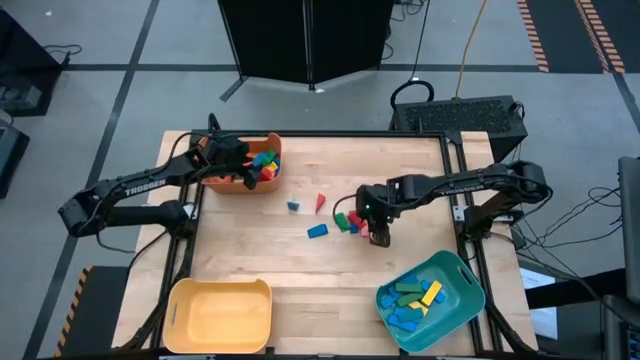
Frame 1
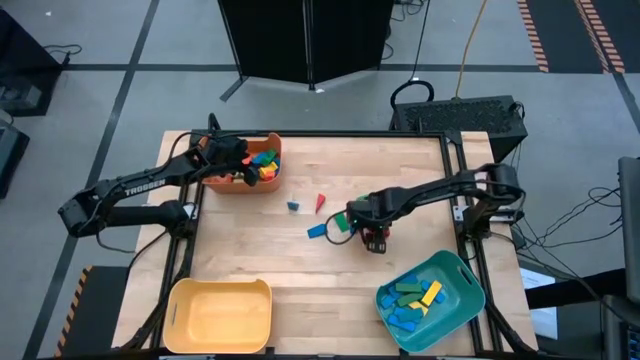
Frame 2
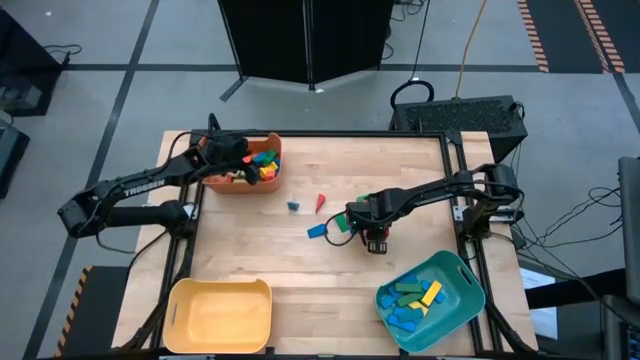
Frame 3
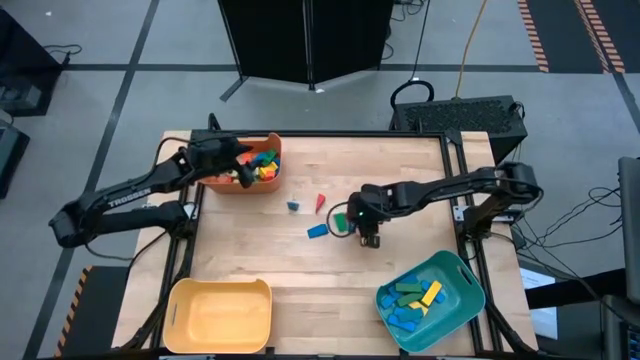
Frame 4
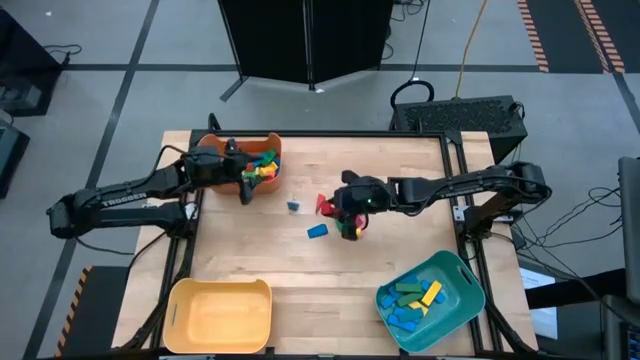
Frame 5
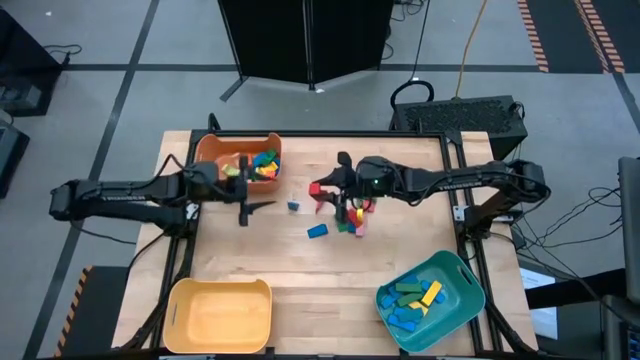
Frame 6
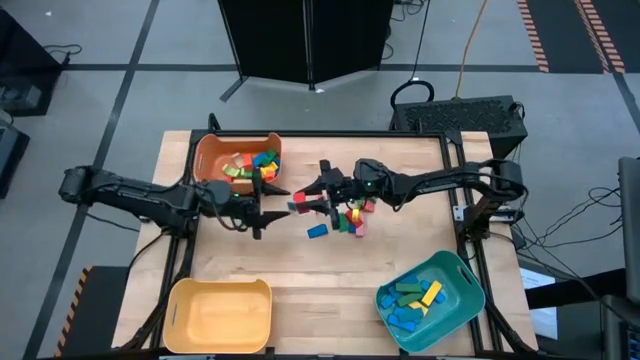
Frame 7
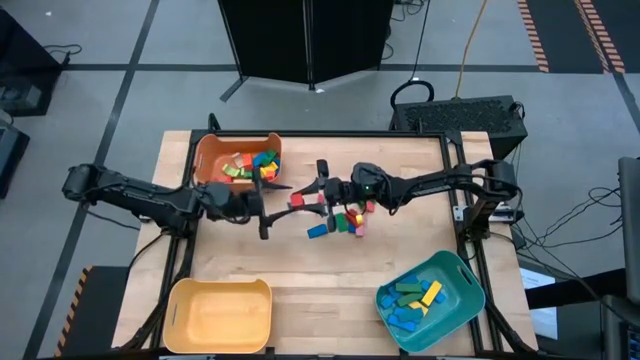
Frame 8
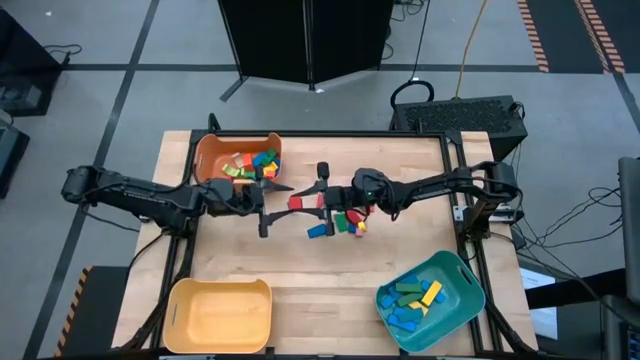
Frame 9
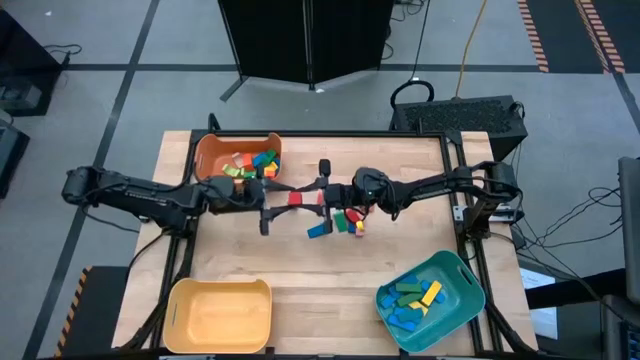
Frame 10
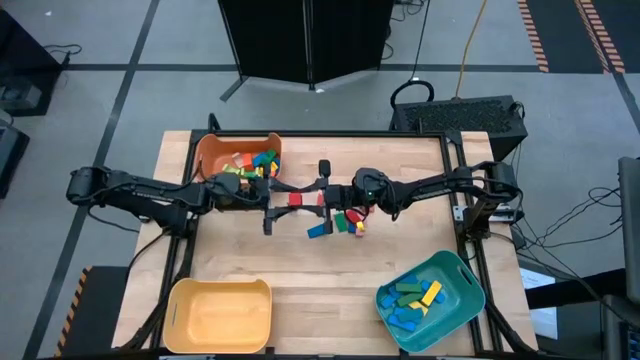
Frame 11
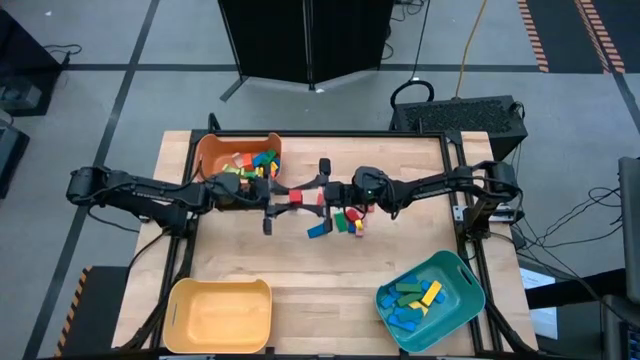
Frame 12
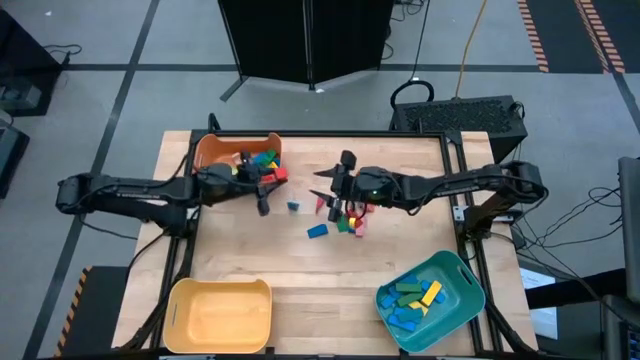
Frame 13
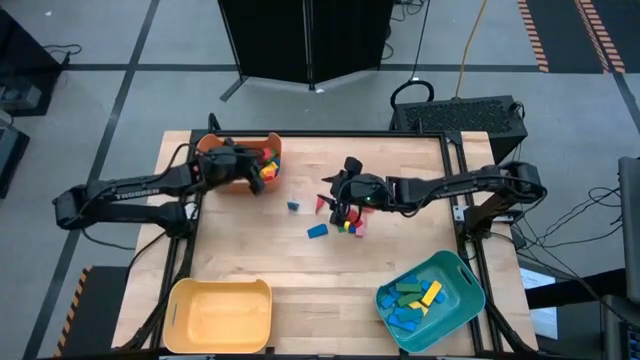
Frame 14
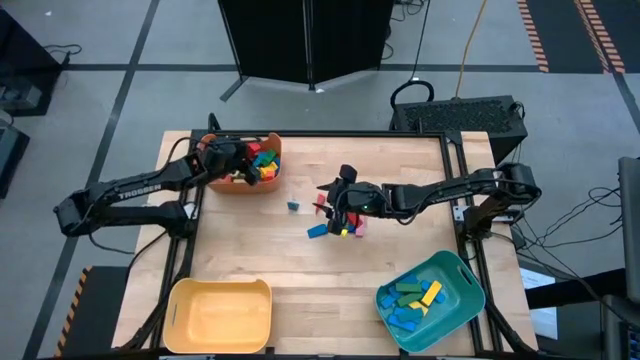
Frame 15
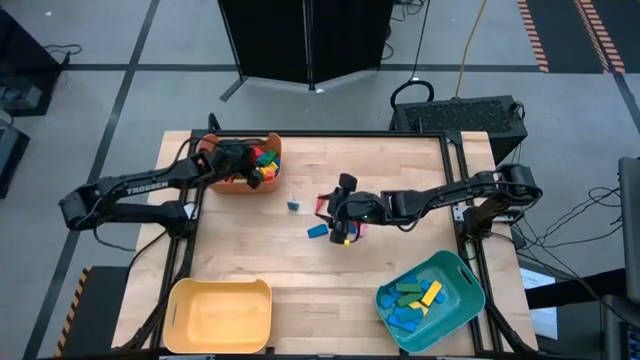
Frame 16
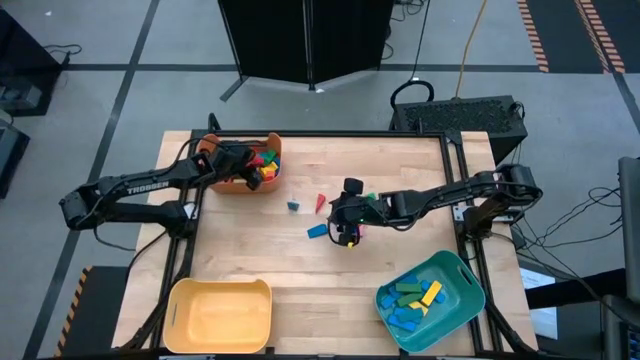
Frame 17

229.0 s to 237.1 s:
Task: Sort blocks by size
Put the red arch block into the orange bin

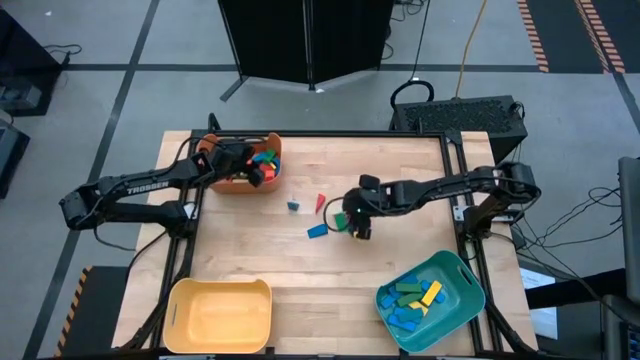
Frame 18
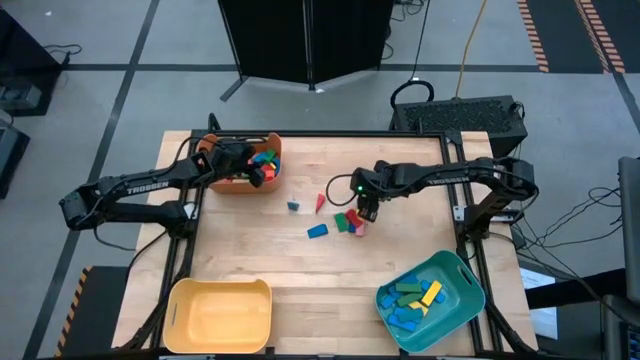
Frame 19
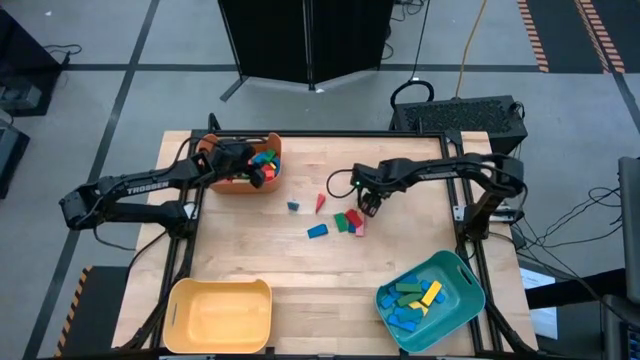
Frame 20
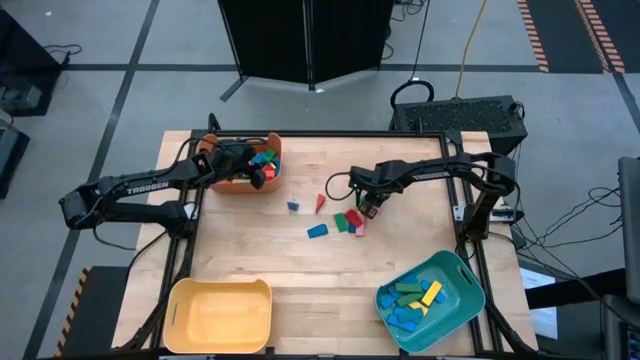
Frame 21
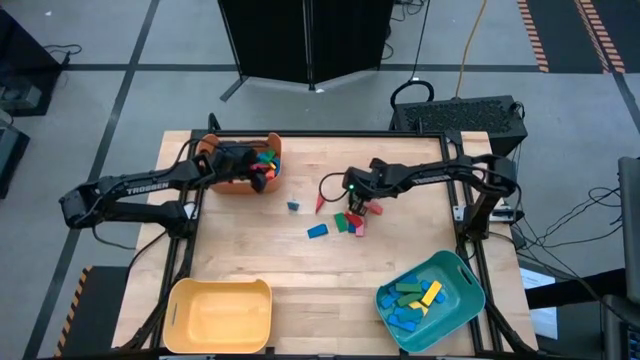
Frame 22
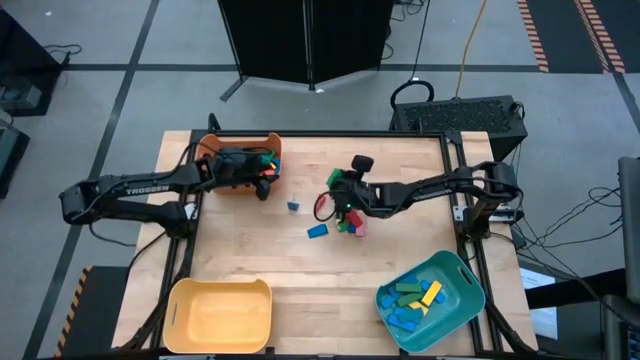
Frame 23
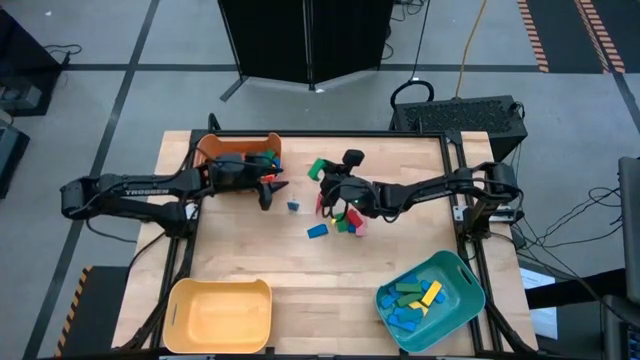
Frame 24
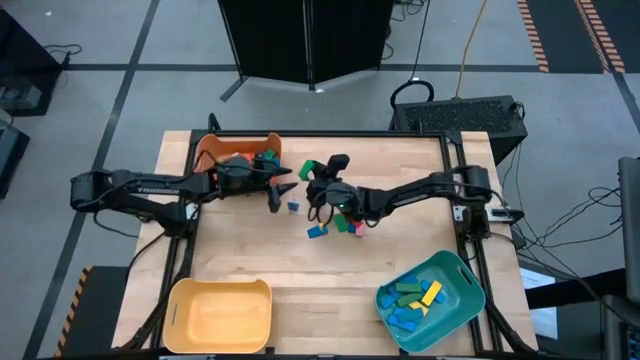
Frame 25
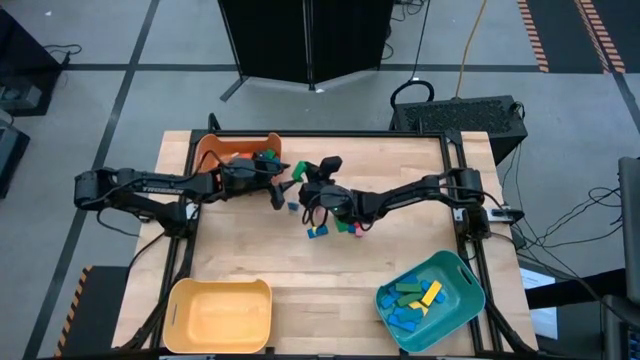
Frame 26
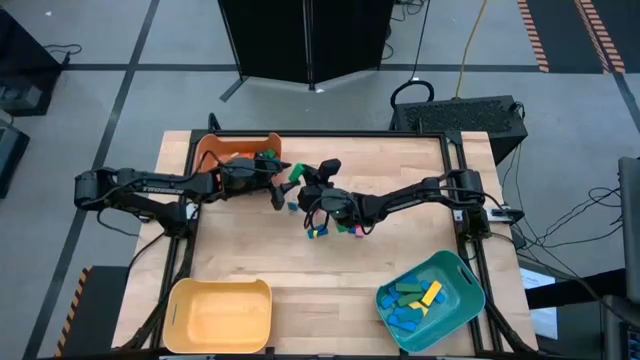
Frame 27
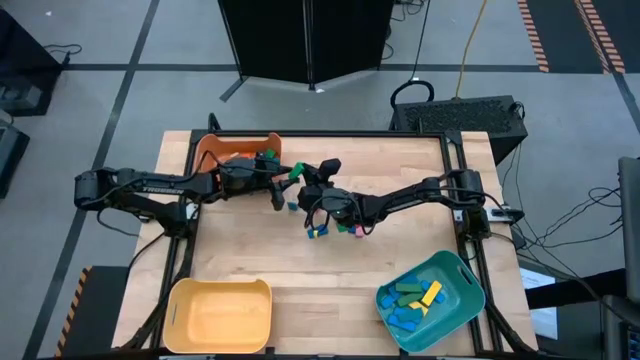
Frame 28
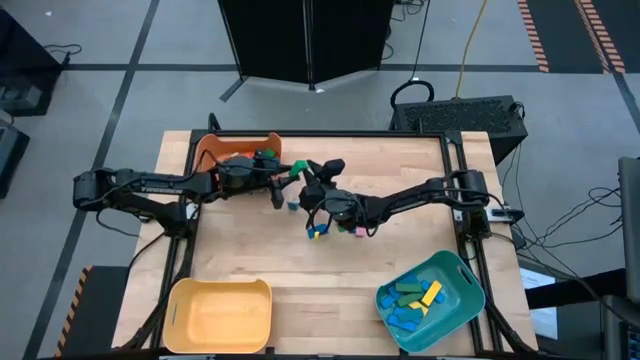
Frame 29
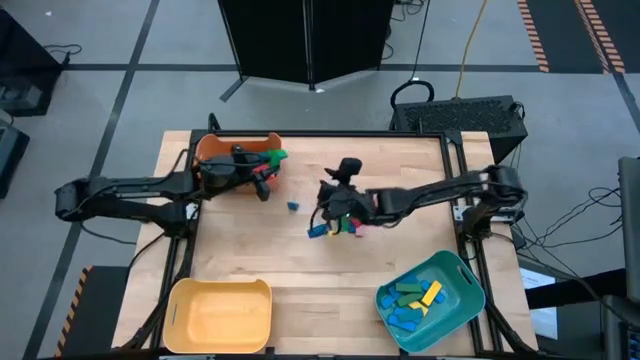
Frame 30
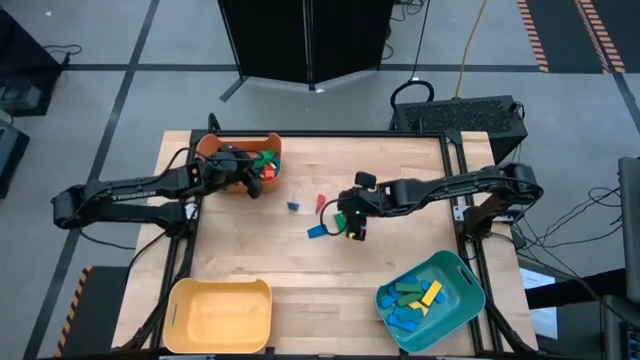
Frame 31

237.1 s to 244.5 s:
Put the green arch block into the orange bin

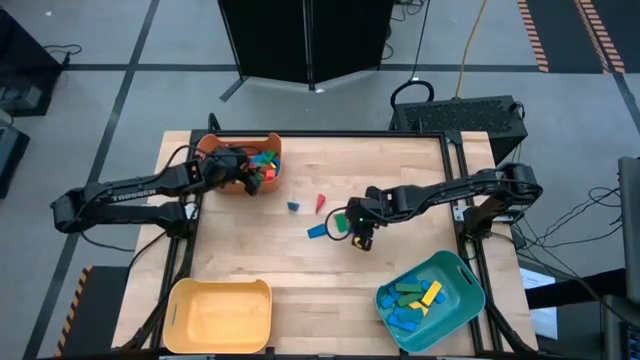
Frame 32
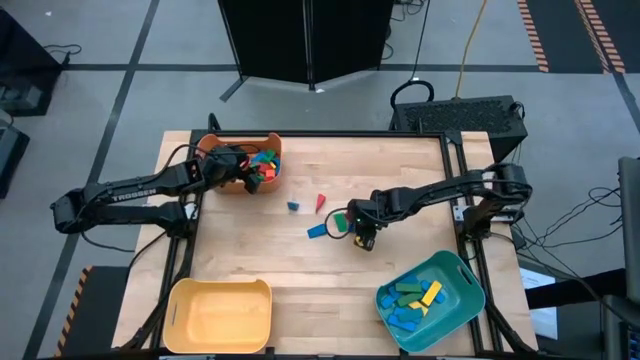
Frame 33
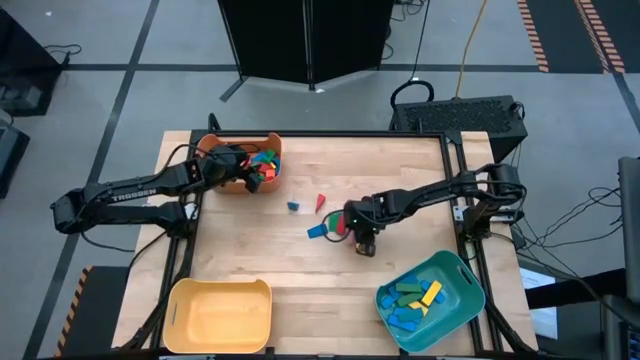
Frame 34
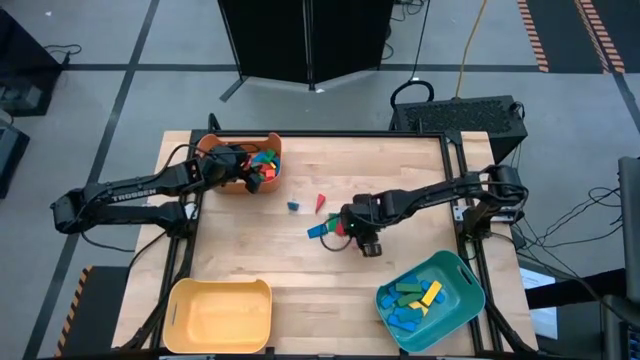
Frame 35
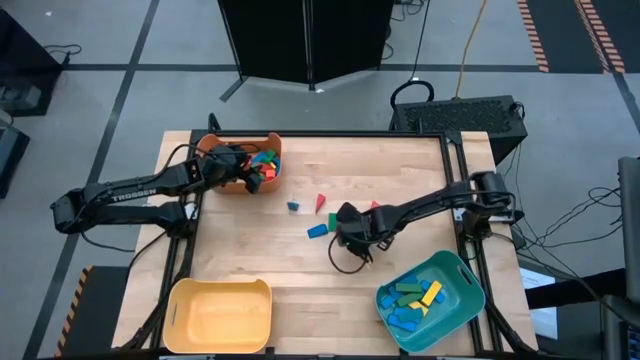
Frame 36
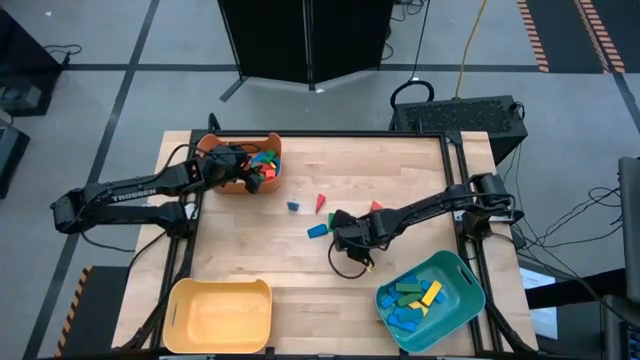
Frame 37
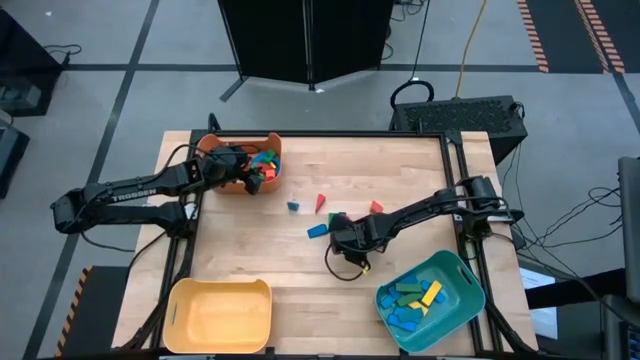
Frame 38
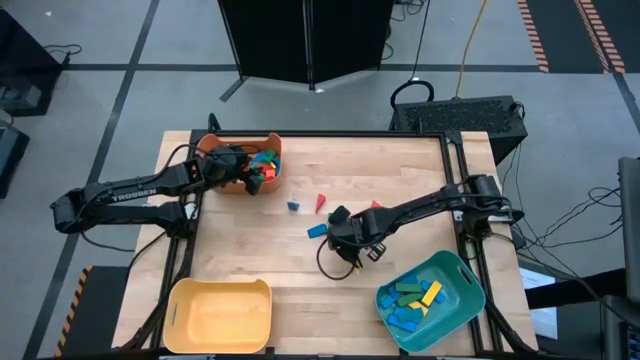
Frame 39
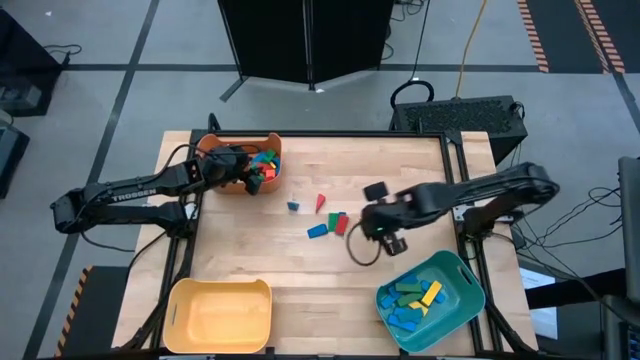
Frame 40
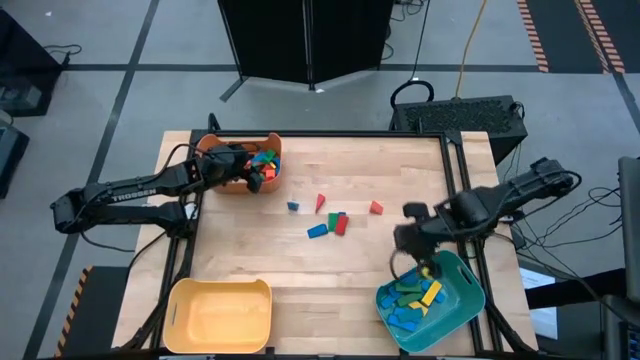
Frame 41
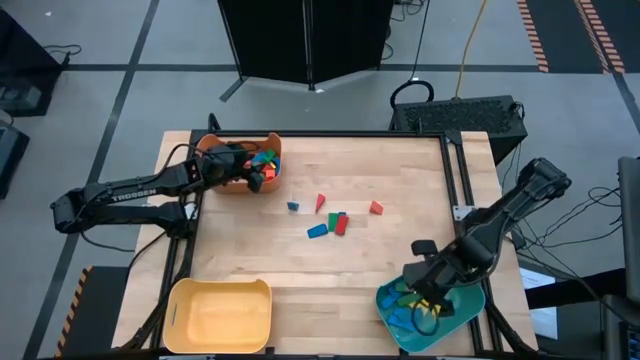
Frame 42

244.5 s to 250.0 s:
Put the pink rectangular block into the blue bin
